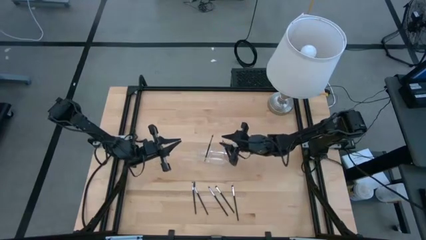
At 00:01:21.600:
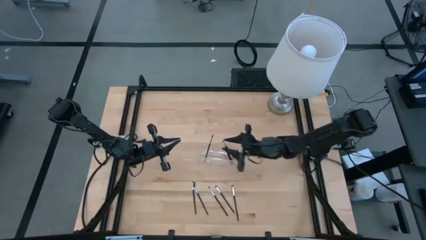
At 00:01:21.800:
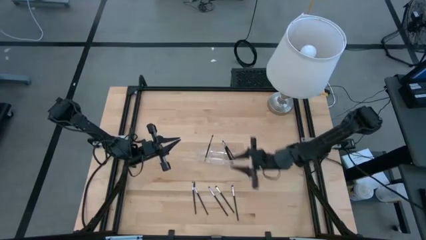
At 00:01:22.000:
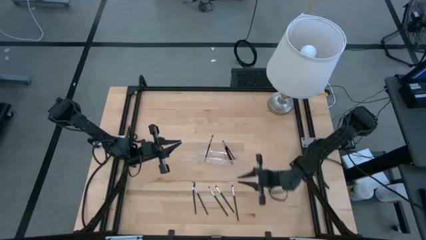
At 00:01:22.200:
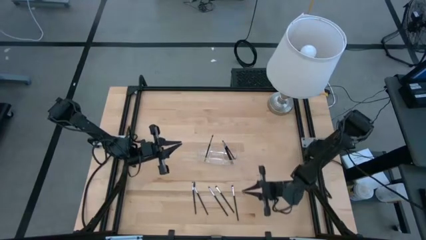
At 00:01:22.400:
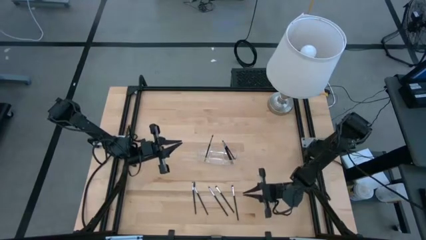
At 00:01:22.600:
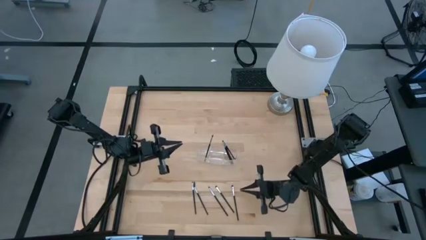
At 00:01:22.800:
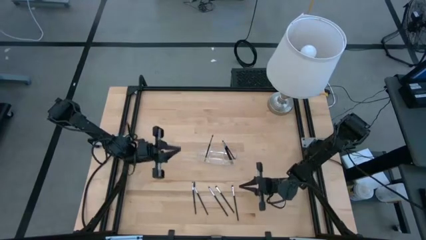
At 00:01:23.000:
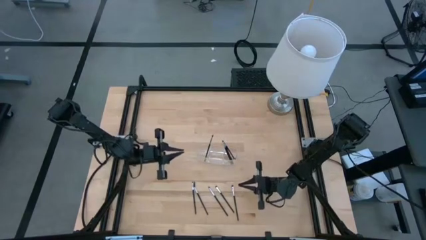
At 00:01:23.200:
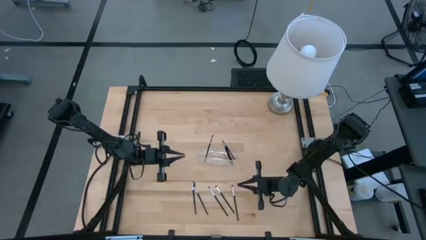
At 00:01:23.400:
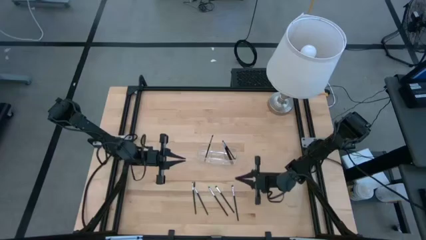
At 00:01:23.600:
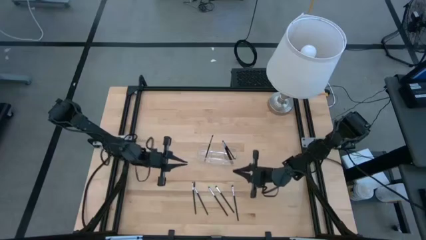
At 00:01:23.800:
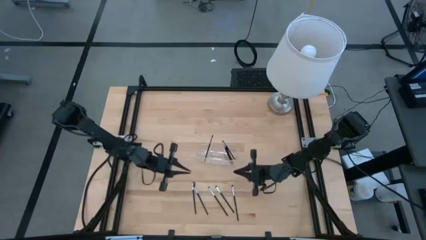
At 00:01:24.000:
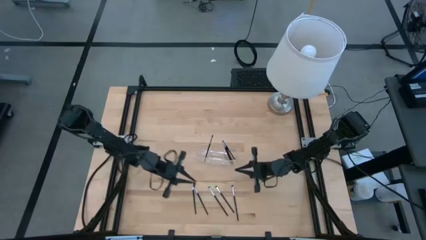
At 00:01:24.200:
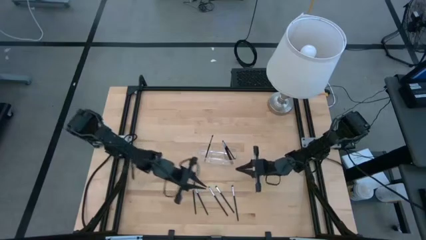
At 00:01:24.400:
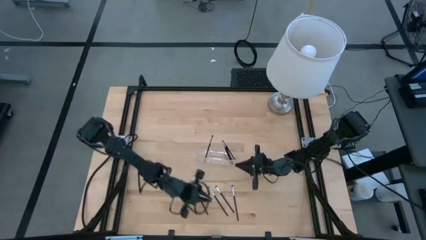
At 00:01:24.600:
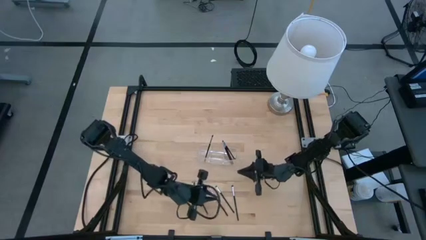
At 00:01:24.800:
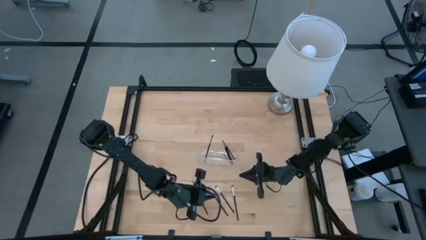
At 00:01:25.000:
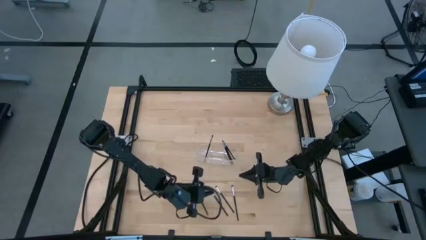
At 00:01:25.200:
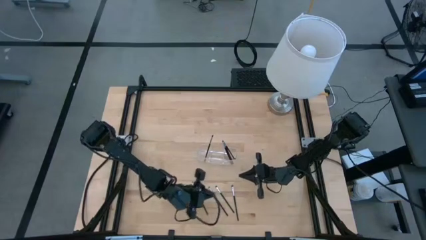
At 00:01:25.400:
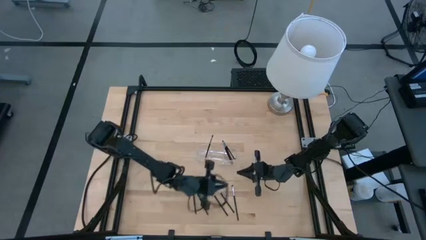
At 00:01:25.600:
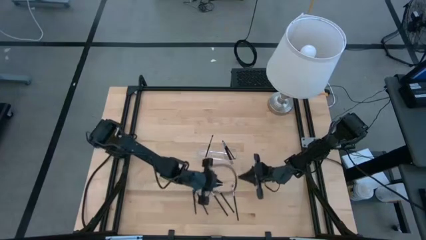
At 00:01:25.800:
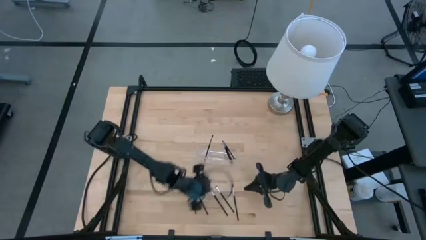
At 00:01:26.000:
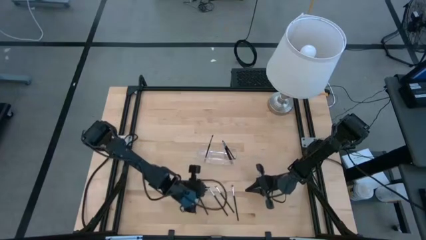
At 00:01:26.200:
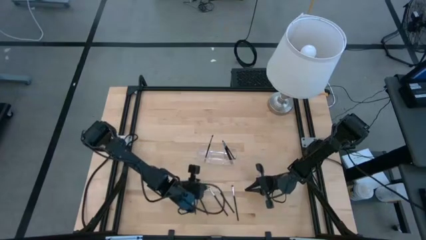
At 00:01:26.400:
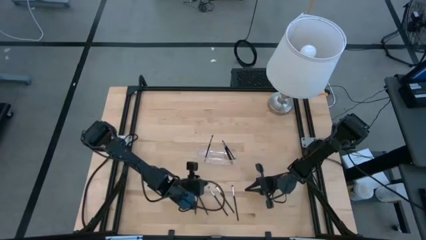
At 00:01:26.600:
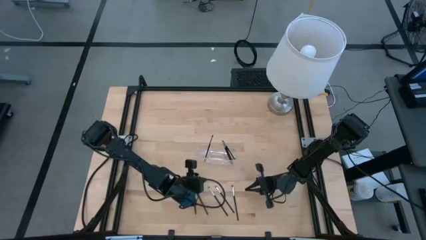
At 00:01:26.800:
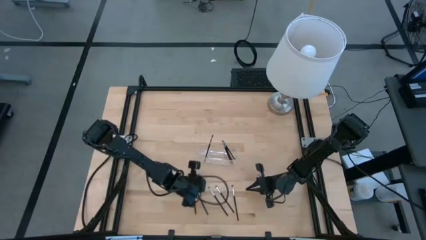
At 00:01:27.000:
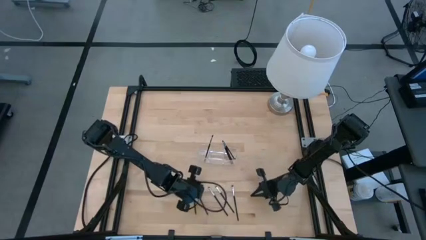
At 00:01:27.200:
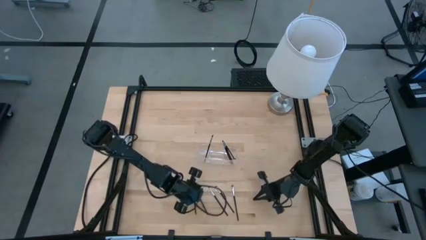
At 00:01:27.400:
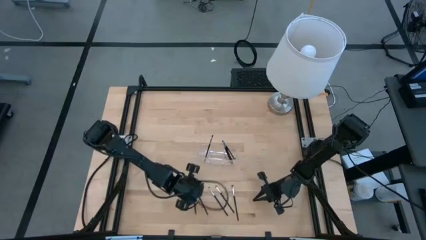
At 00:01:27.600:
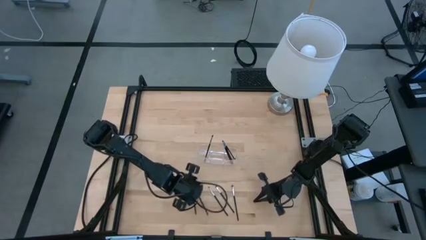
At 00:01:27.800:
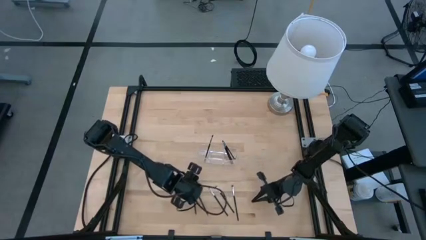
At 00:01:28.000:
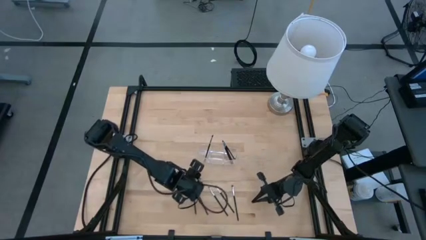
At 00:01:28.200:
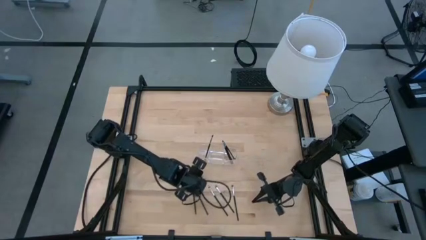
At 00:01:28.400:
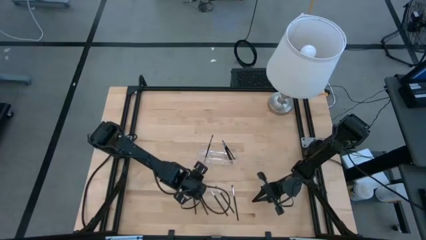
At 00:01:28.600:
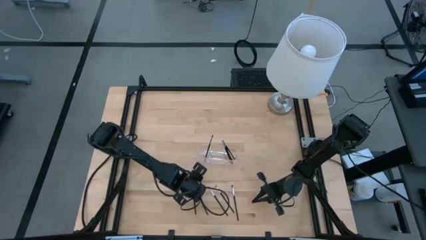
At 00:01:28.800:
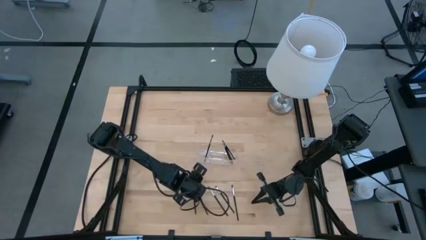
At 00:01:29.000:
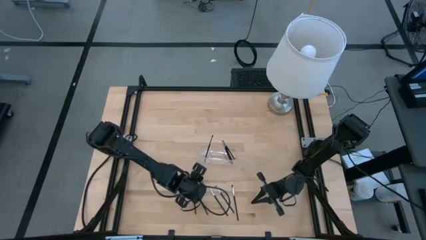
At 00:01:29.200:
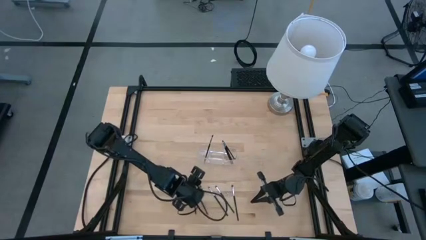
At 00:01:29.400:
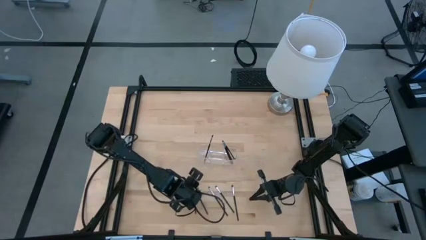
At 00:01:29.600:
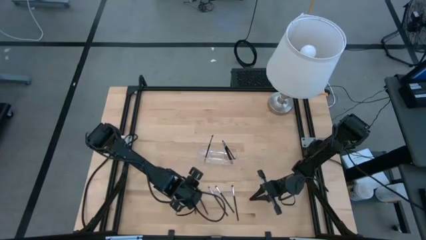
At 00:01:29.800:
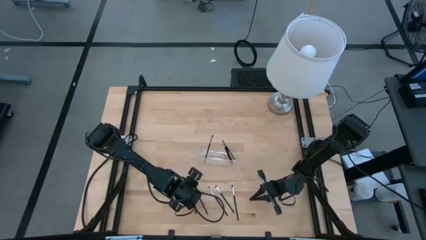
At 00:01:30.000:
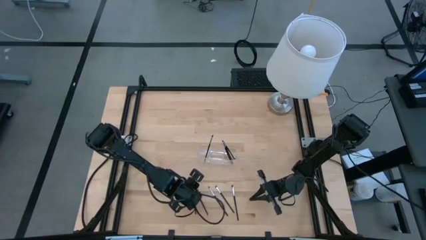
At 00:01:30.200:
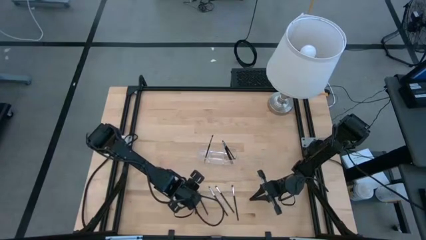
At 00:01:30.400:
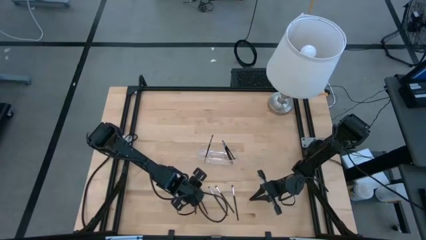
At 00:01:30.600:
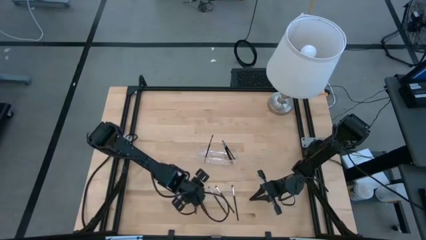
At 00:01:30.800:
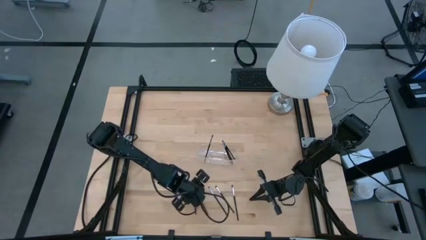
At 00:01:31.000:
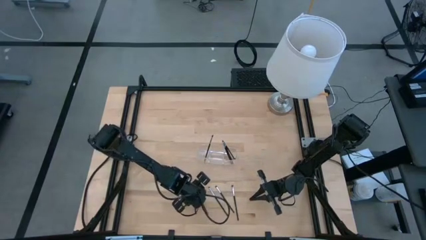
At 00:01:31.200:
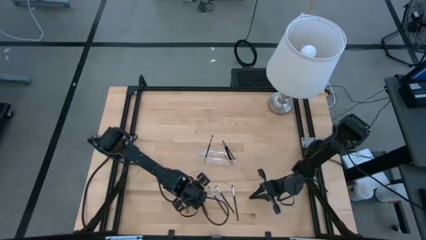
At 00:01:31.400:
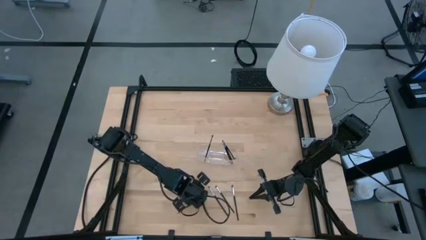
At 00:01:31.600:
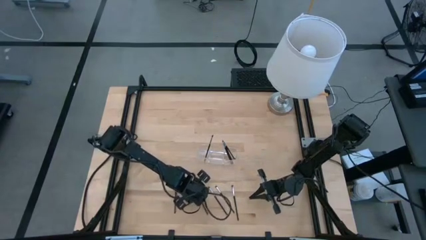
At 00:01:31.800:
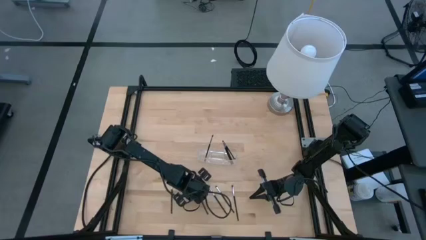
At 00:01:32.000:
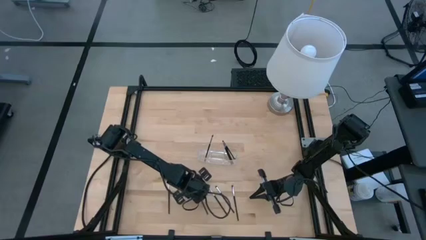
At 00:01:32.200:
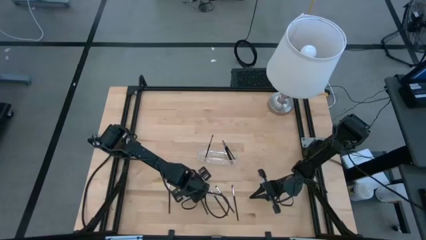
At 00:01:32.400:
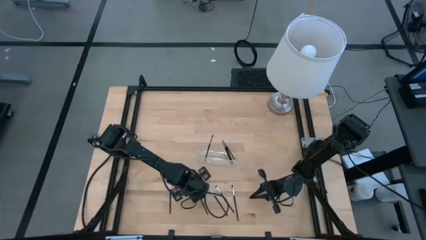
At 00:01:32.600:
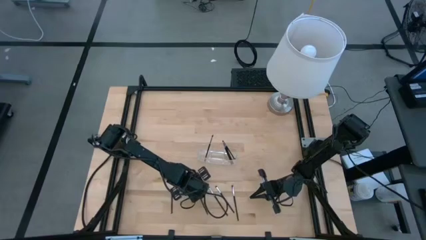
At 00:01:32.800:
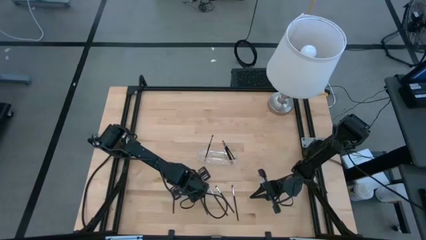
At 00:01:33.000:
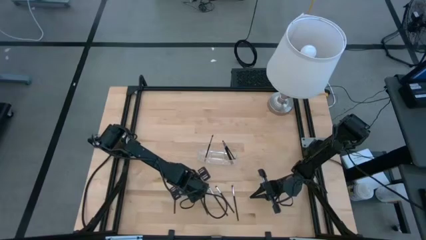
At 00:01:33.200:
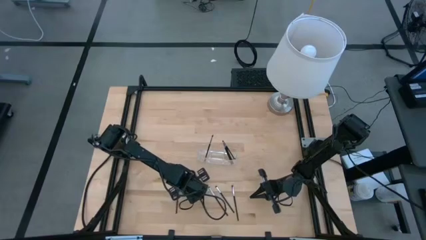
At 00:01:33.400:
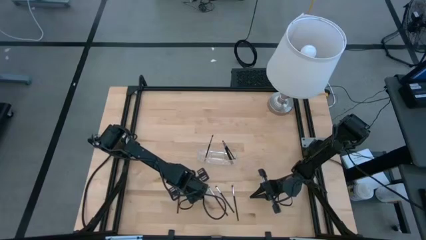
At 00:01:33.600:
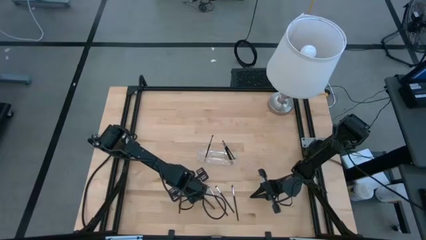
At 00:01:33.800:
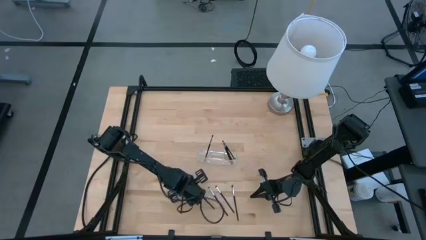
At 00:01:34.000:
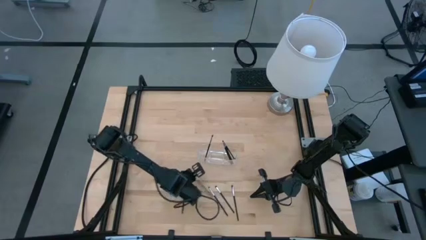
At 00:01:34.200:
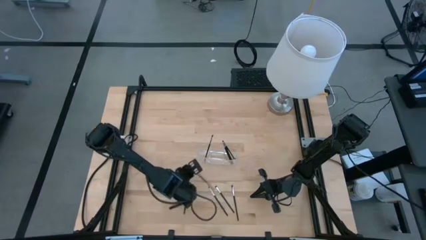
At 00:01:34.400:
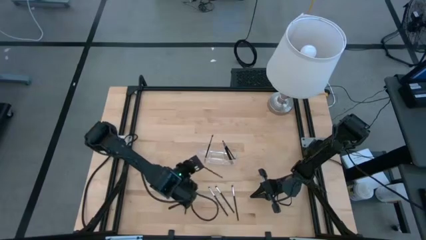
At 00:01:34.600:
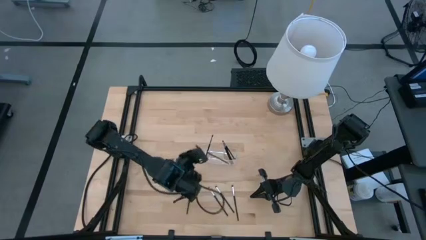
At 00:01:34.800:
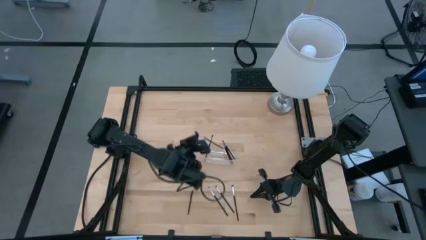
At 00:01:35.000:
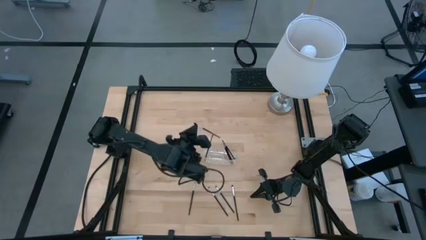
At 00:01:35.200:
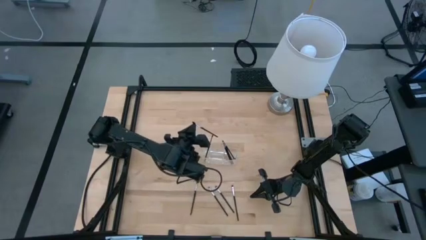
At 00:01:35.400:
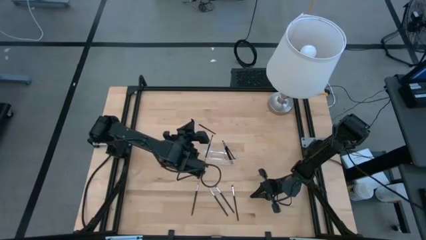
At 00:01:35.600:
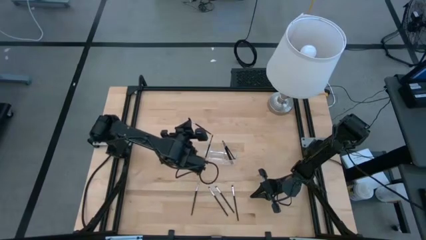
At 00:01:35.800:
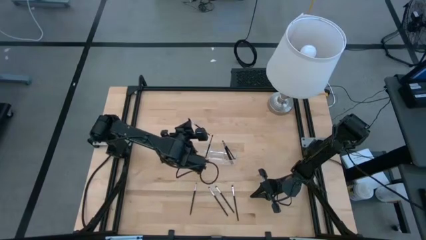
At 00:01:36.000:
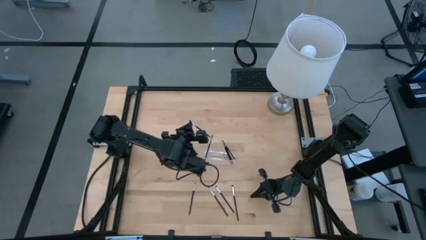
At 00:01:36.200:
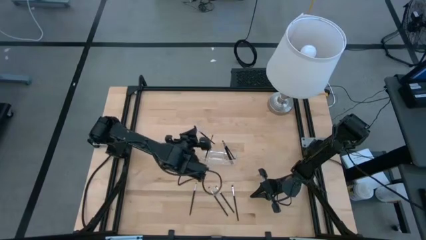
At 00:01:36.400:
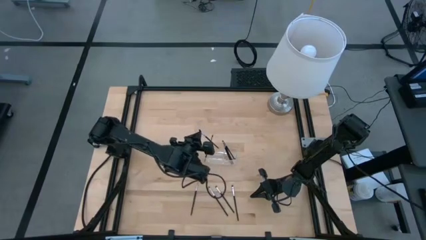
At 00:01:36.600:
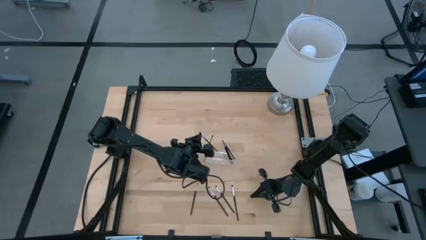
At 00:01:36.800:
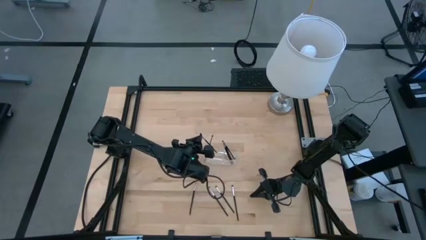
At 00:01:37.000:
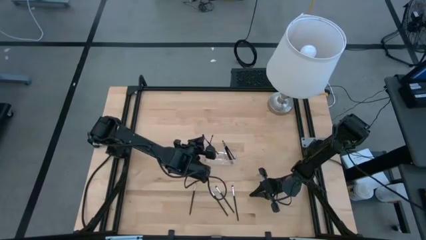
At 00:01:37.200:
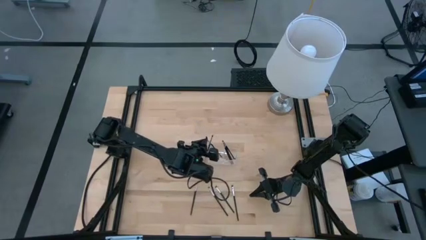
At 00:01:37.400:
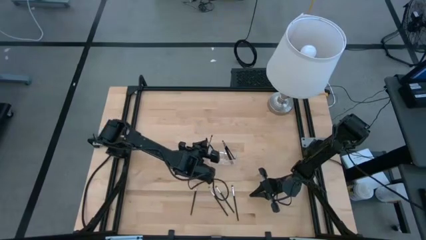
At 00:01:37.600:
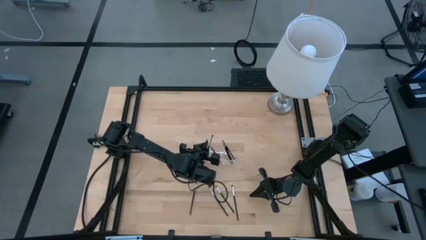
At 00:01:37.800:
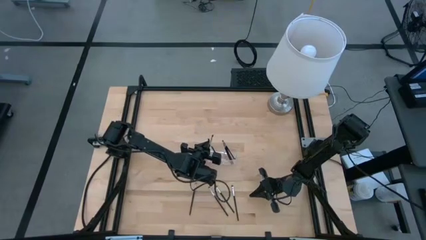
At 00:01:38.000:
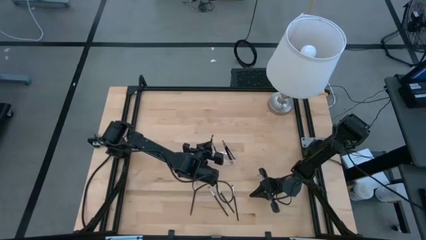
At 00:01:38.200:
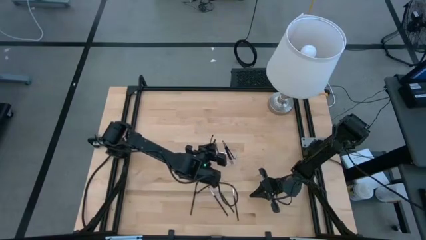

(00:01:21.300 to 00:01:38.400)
Task: Put items in baskets/containers
Put the brow brush in the transparent organizer
